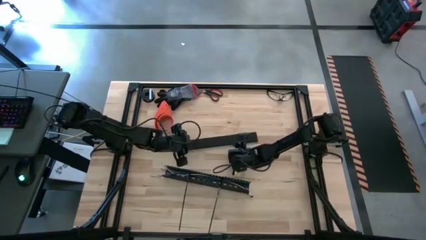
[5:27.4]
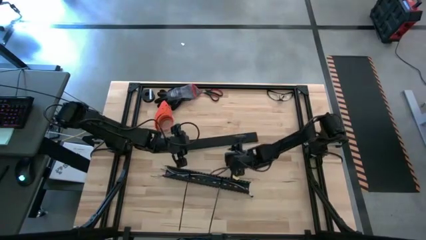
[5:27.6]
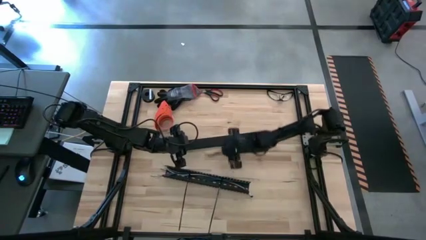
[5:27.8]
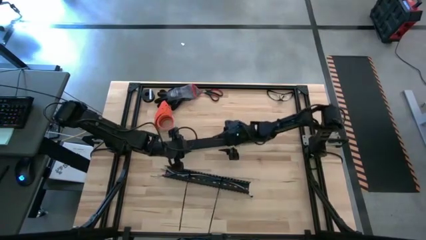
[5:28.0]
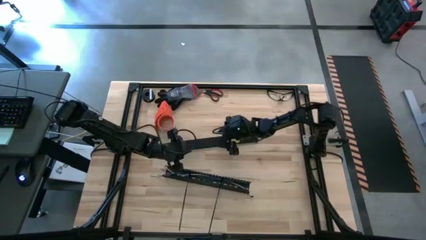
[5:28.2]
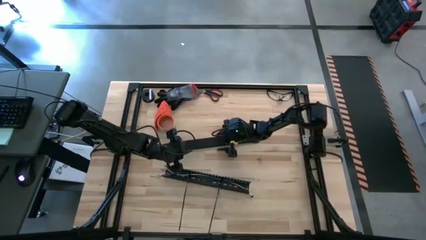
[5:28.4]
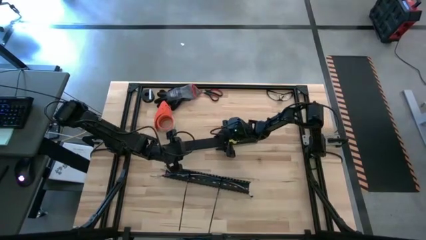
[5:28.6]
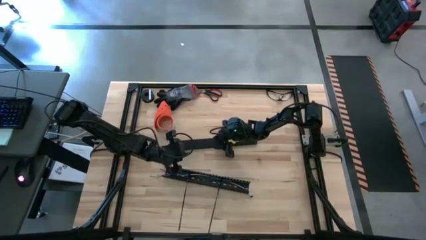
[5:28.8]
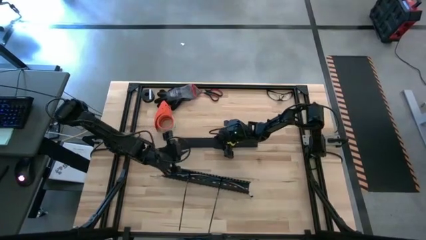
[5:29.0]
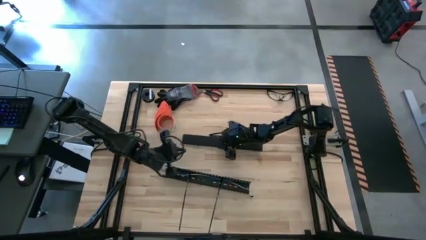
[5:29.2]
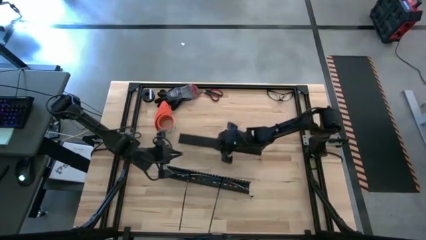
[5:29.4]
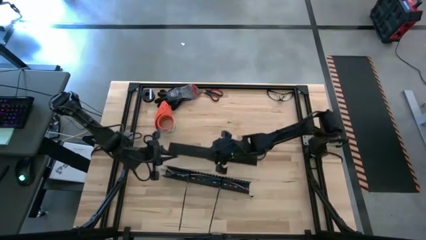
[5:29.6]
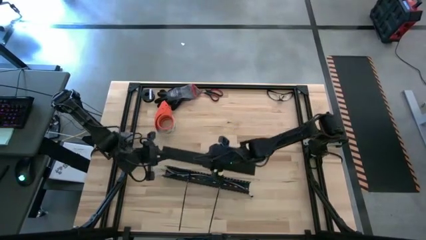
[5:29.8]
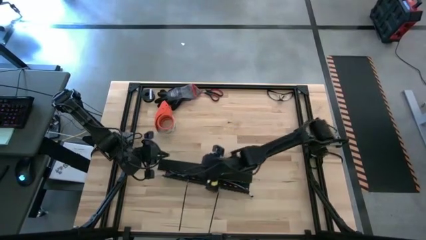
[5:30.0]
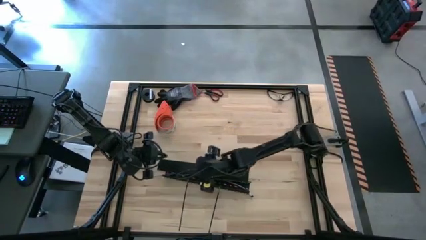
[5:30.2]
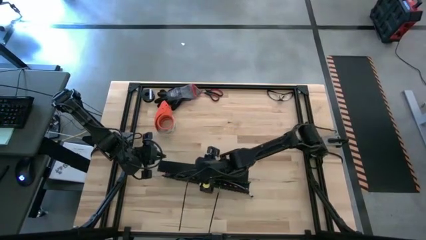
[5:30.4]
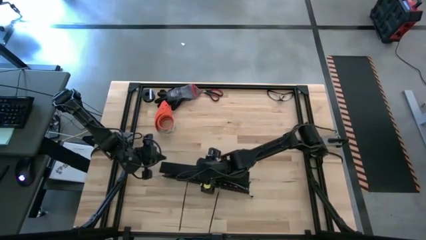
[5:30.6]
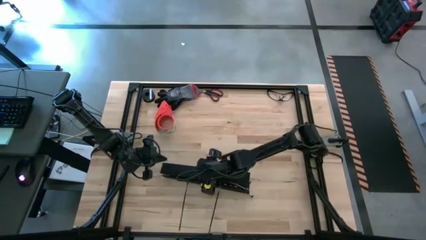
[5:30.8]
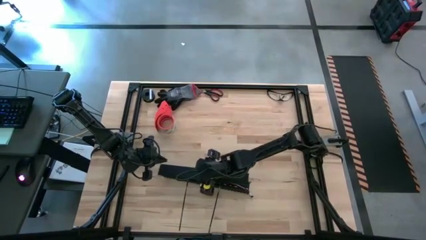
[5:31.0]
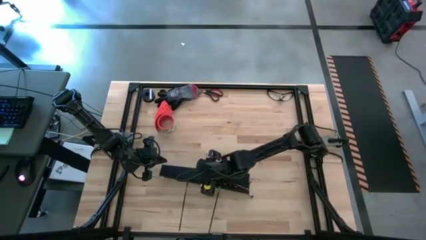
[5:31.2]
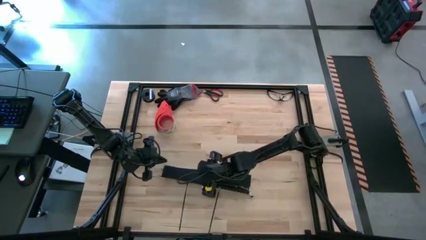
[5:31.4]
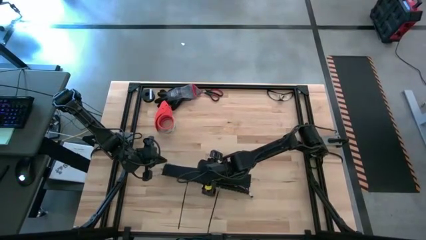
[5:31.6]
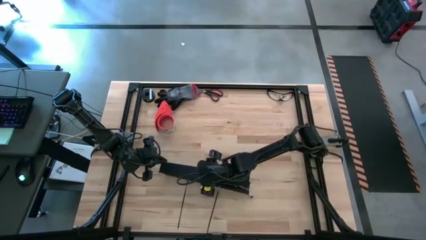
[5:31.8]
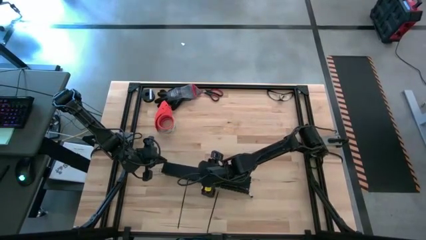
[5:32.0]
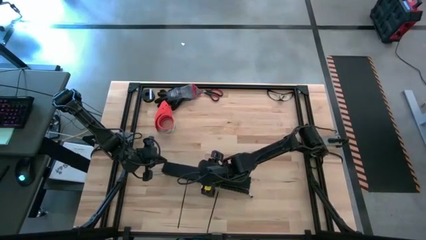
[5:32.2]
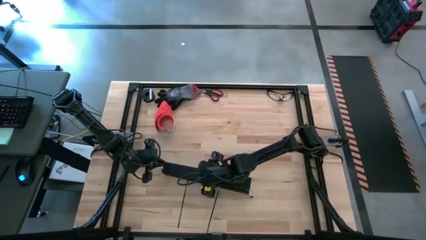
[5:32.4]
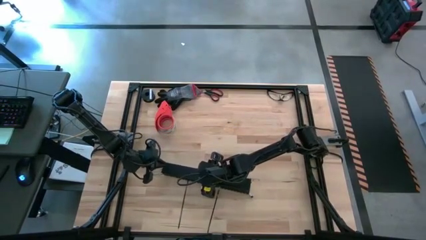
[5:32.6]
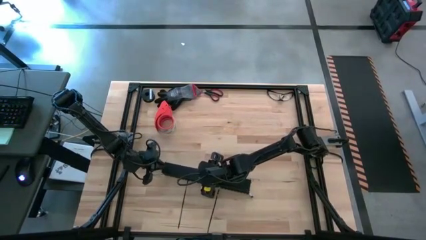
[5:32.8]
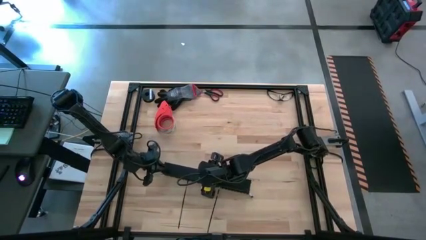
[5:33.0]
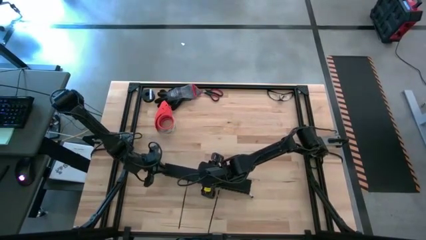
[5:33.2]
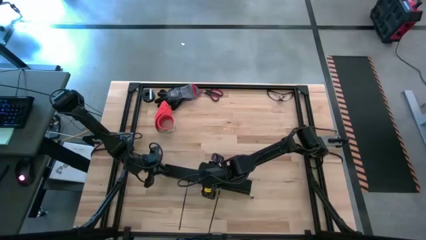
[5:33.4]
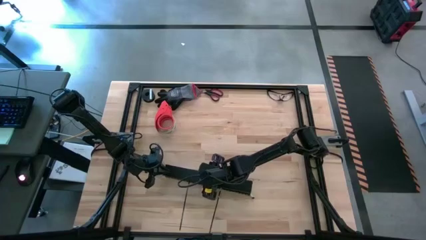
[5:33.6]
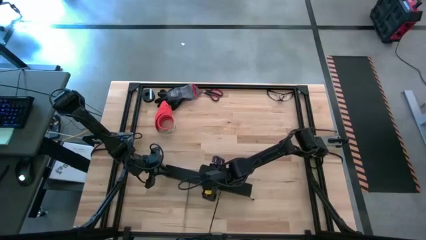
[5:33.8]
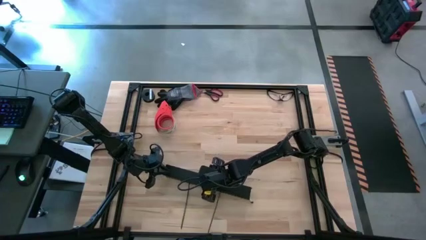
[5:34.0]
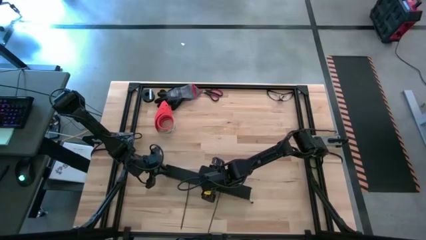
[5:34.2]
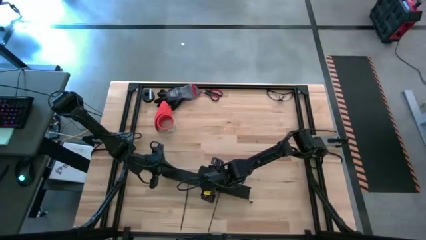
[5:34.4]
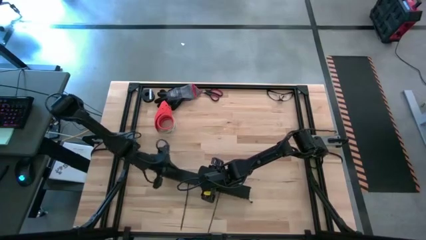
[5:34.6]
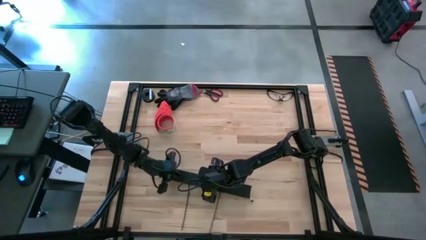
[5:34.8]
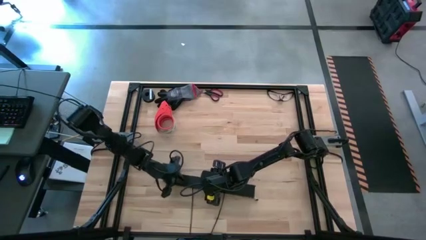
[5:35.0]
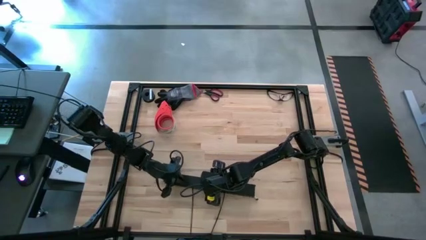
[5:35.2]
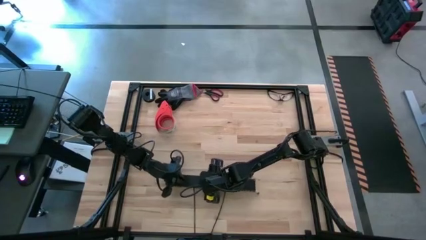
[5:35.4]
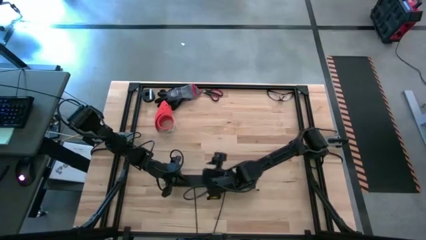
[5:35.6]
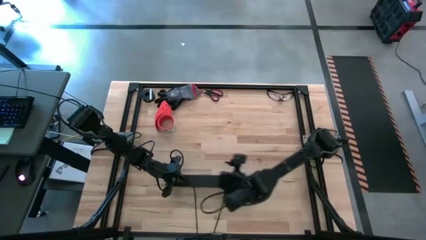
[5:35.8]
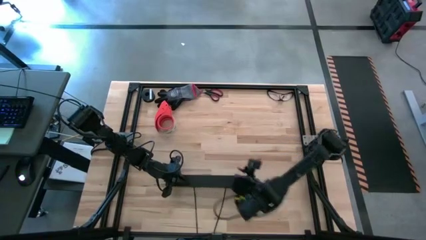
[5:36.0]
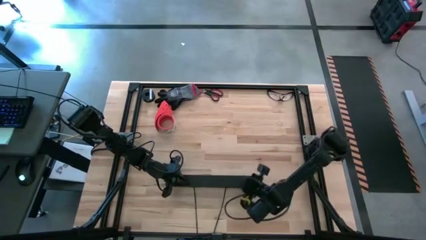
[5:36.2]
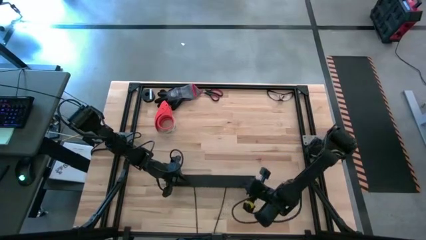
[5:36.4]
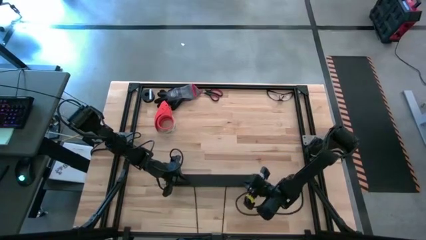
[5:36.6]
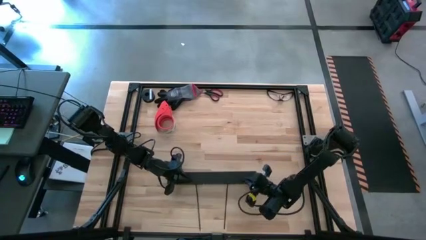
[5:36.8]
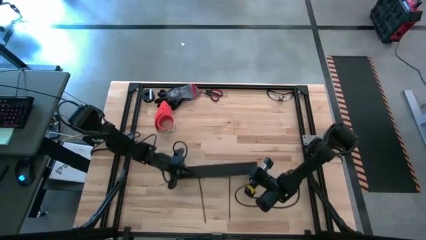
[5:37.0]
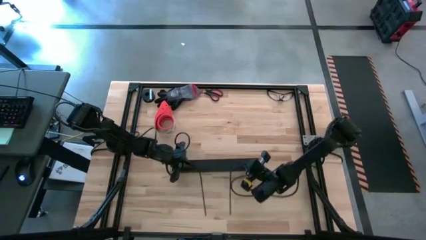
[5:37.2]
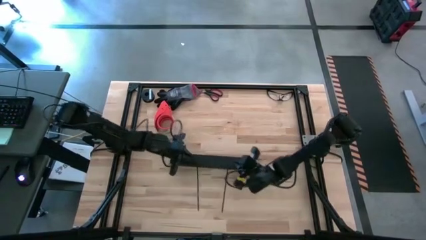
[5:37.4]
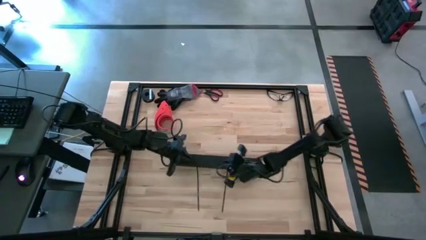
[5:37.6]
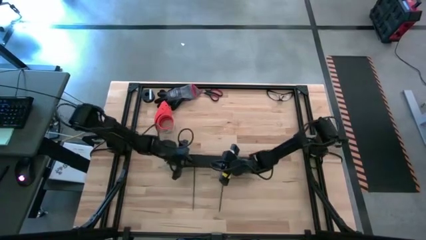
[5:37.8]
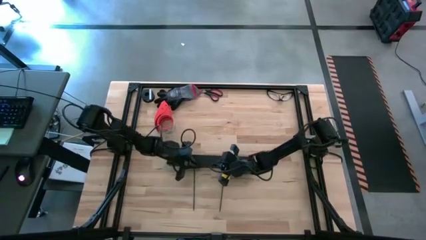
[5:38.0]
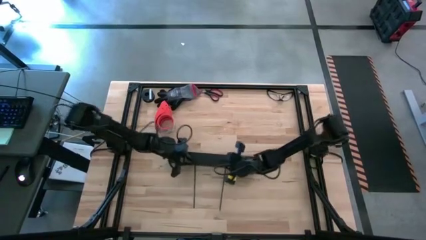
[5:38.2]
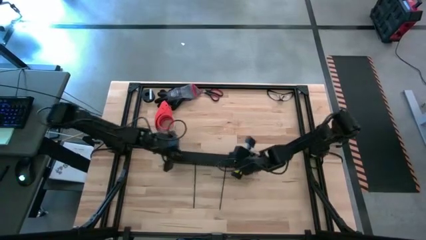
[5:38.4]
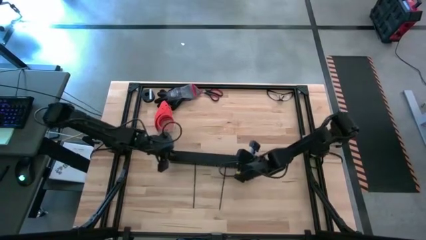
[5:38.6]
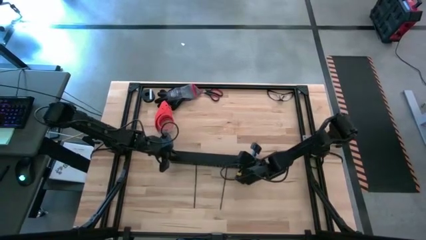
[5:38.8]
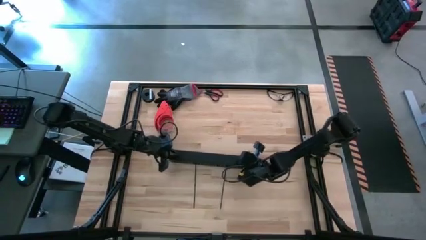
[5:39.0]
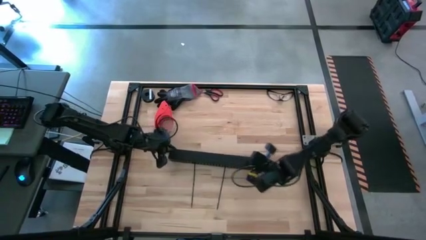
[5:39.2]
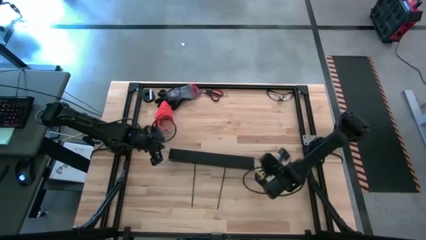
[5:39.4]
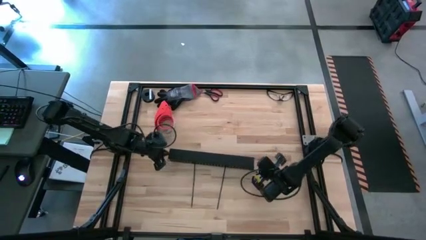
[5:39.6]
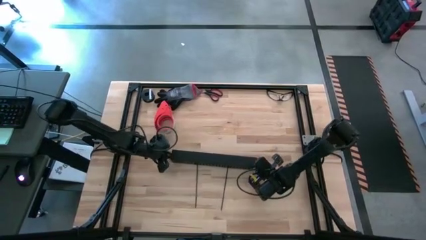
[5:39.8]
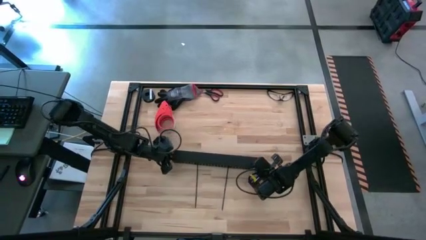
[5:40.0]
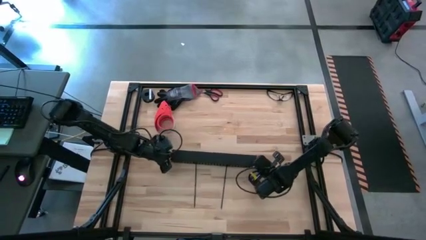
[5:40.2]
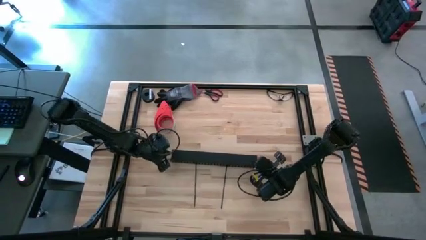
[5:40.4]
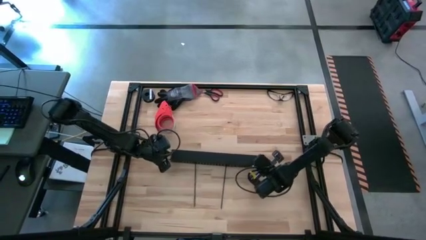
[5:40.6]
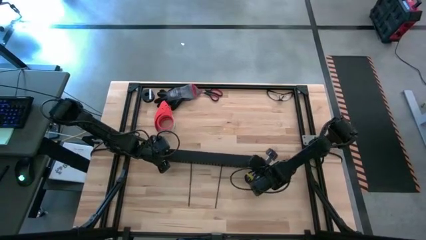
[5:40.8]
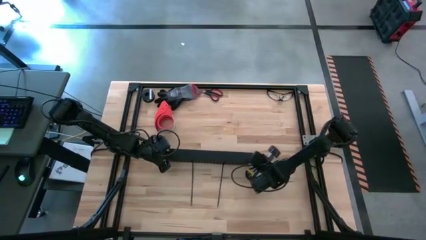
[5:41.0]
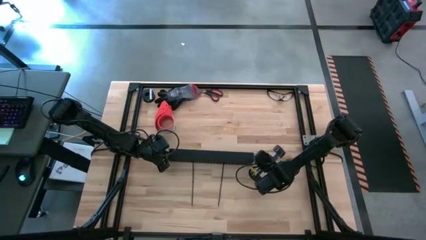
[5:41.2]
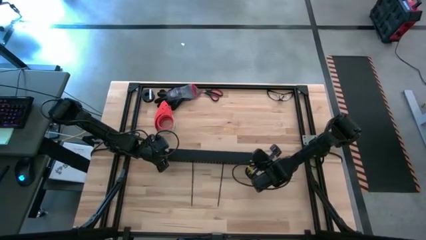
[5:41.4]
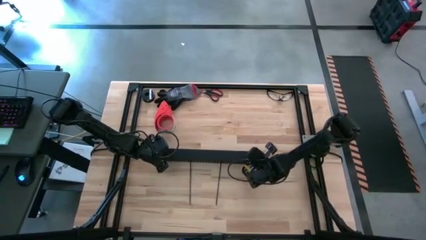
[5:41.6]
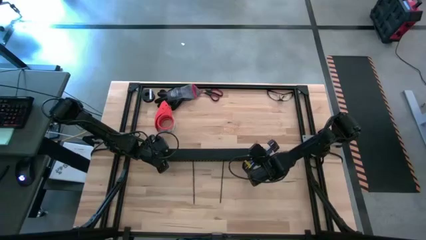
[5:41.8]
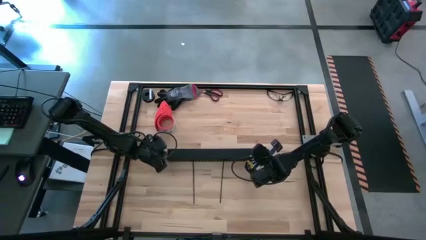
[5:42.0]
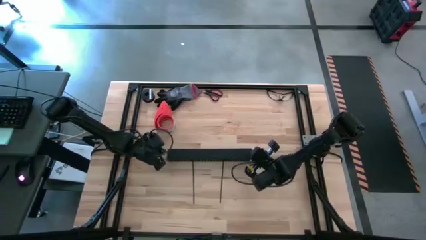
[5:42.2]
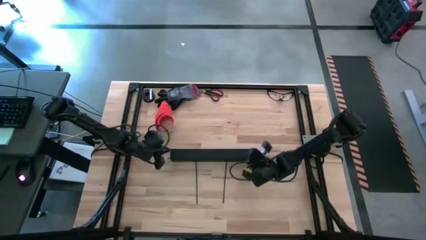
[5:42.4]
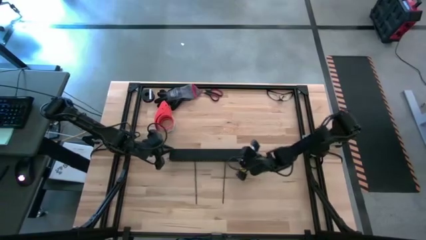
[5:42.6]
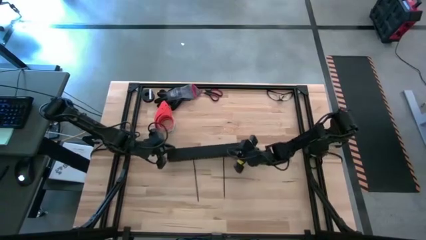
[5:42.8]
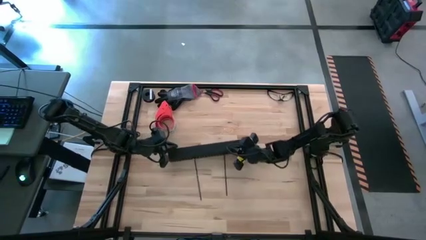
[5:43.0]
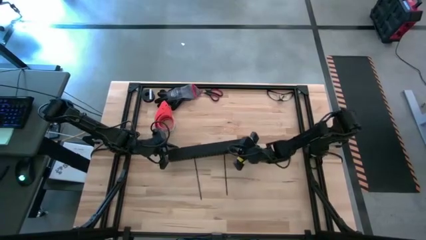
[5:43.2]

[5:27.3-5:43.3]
Task: Ziptie cables
Close the cable duct
